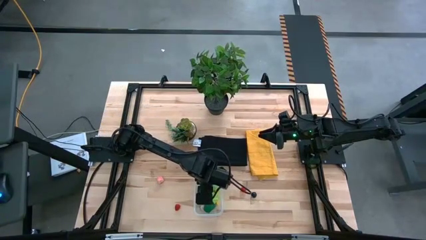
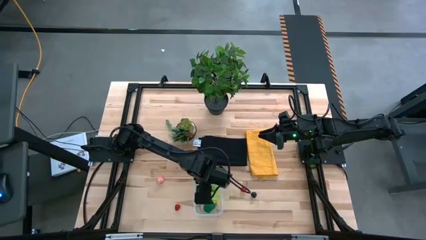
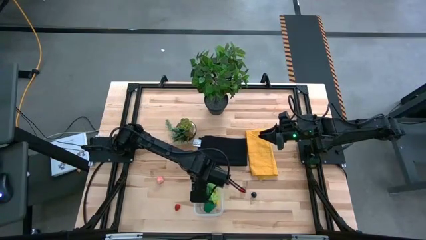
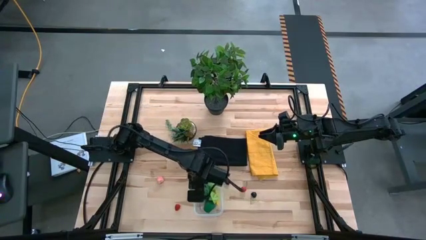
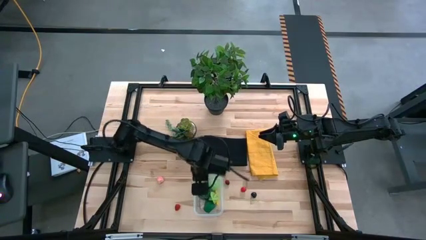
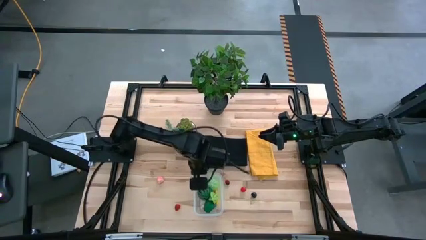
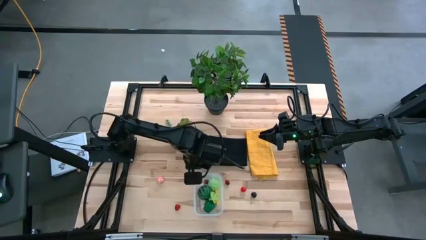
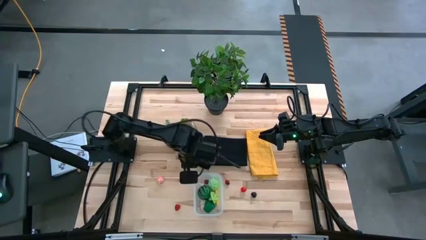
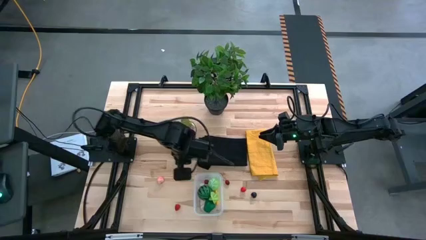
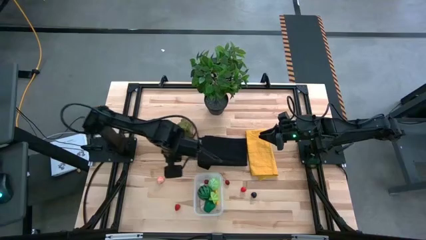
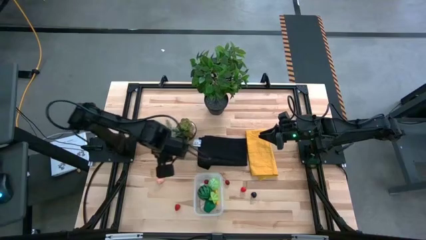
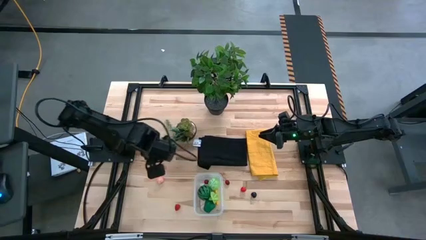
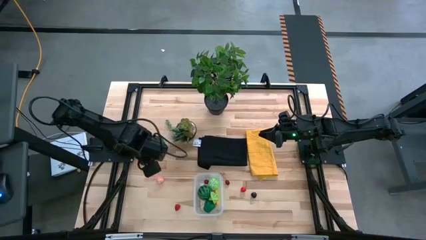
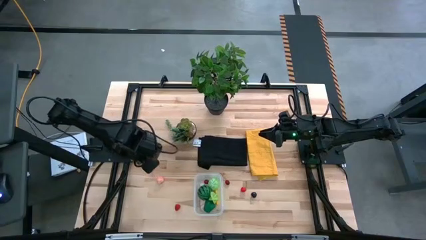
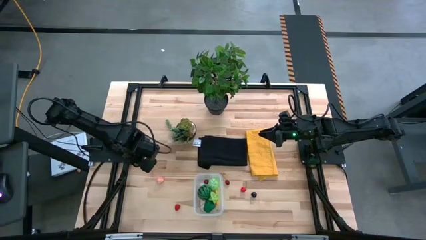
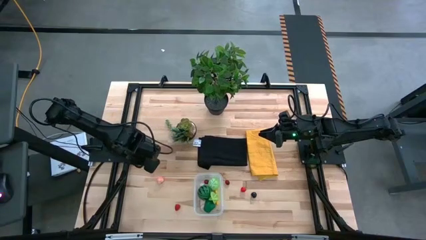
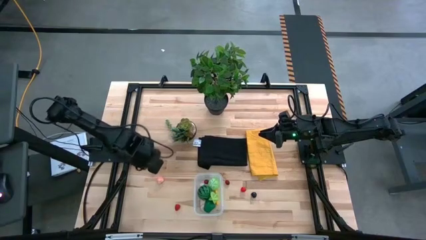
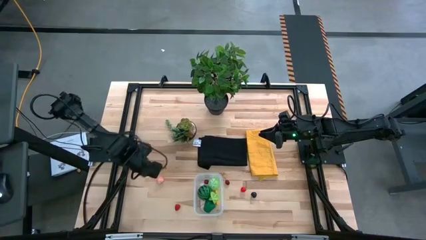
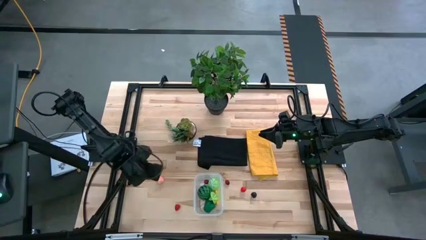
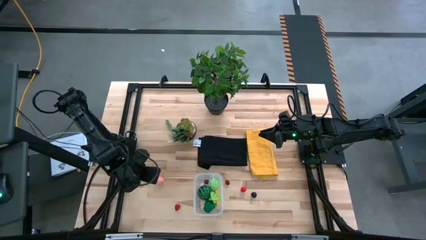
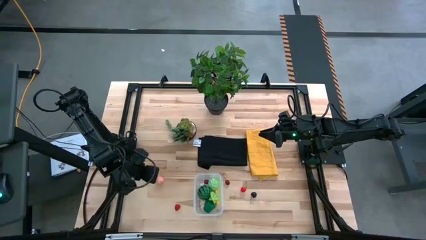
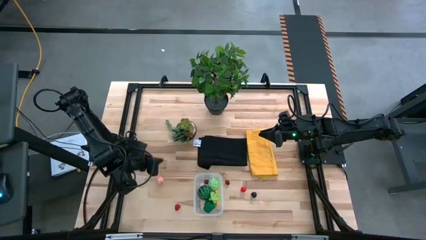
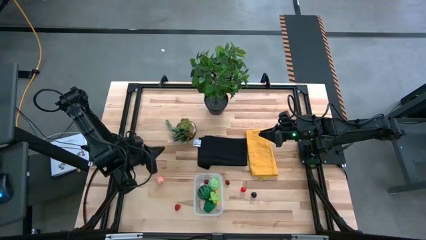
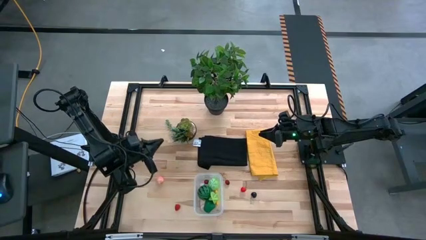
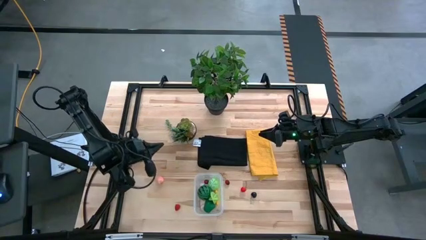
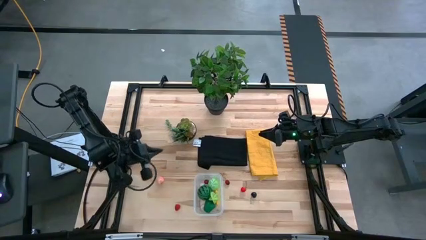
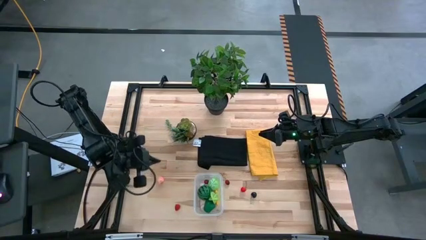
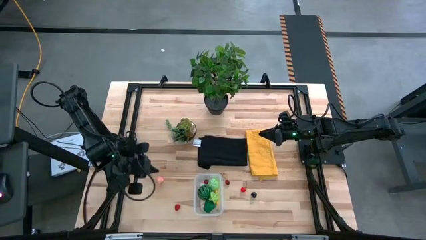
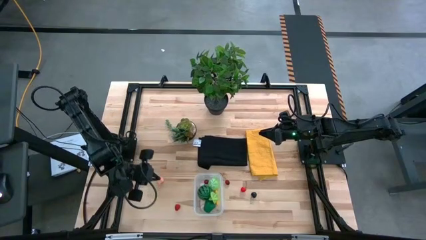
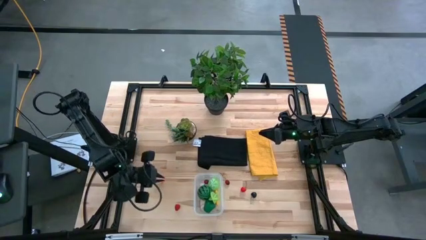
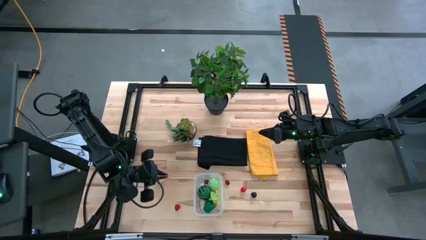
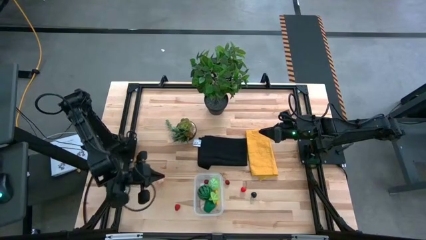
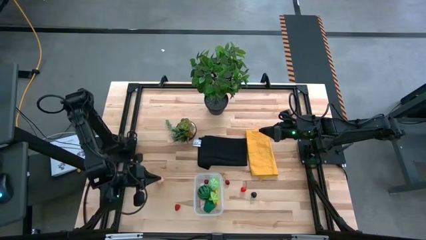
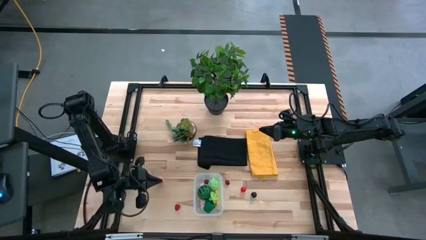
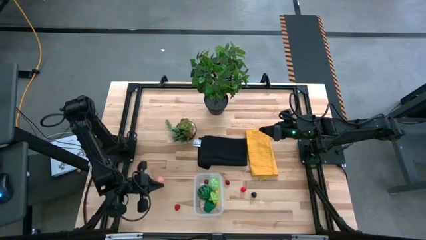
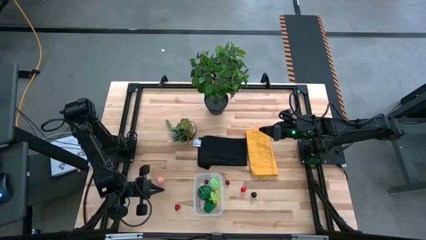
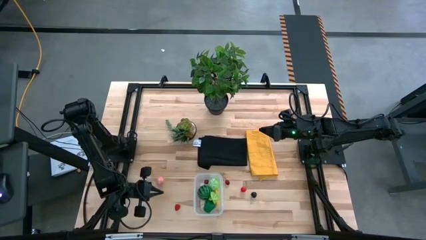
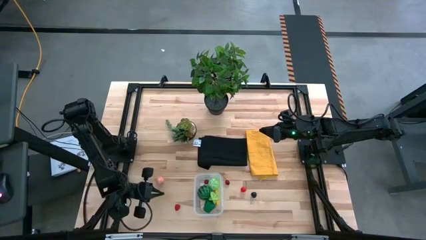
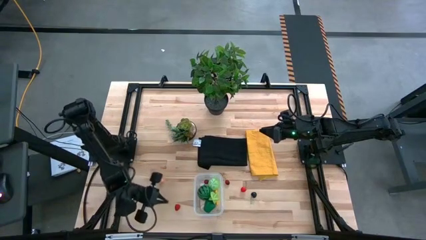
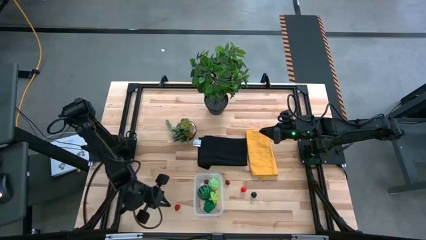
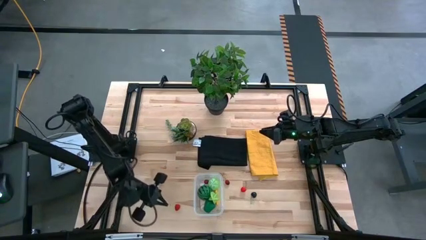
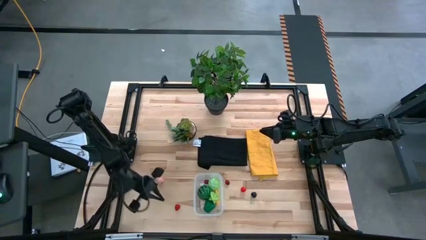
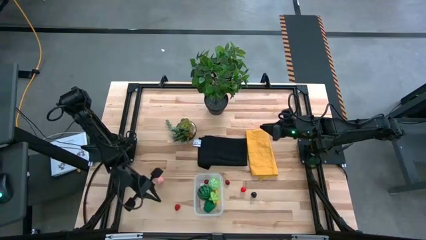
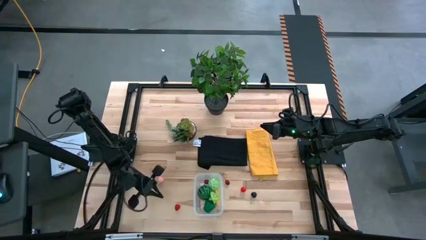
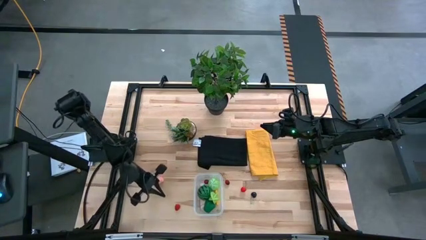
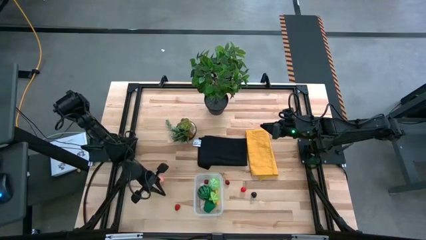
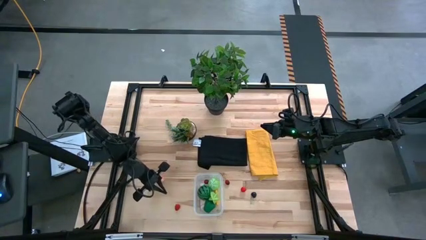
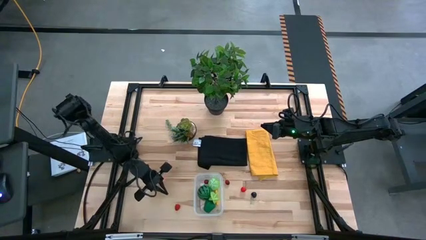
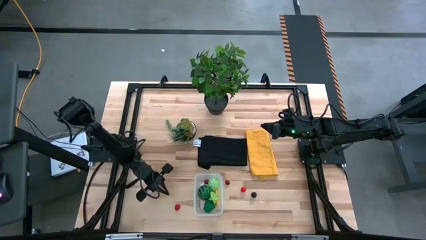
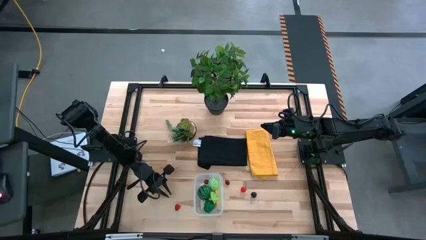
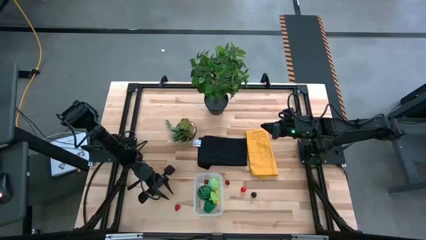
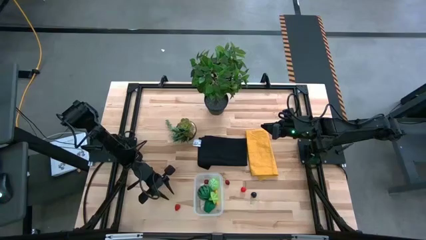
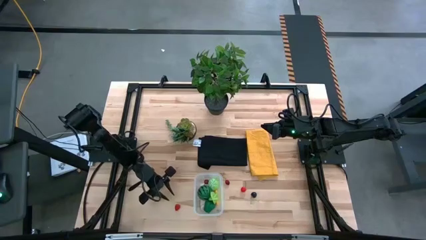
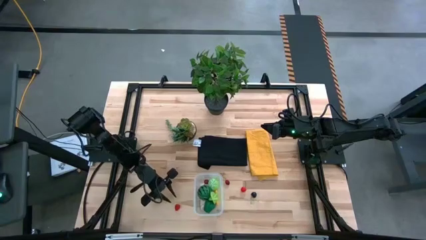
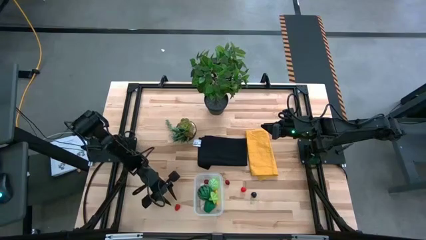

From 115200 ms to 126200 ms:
Task: Pick and placing Produce into tupperware
Put the raspberry into the bin
